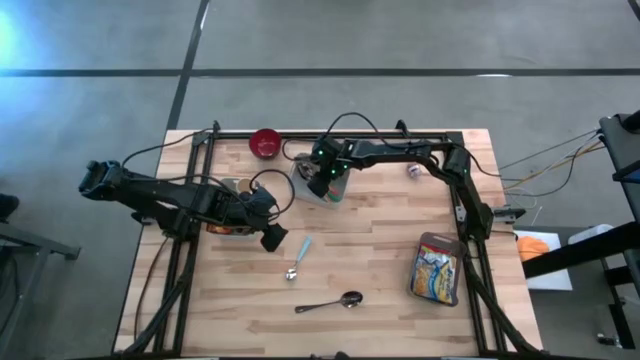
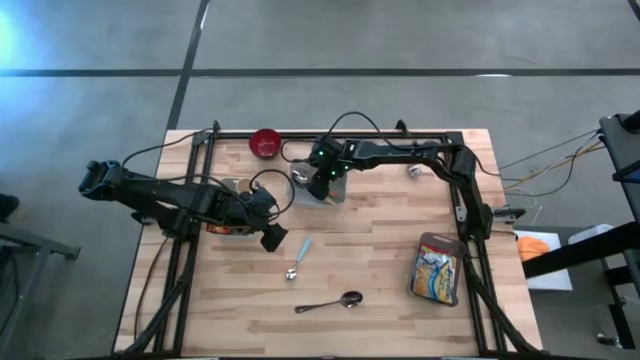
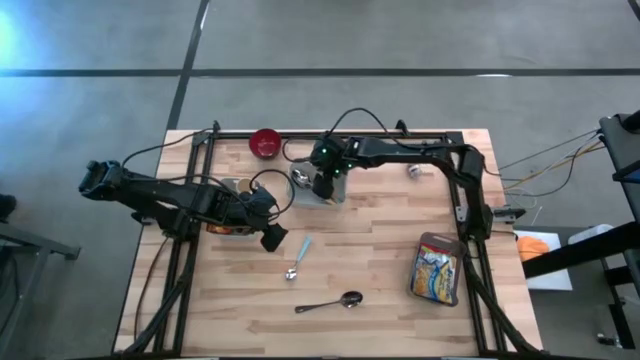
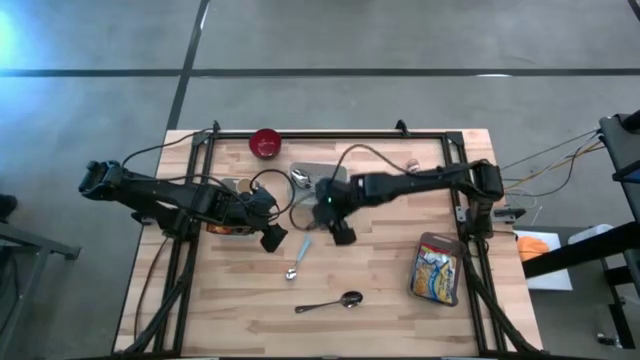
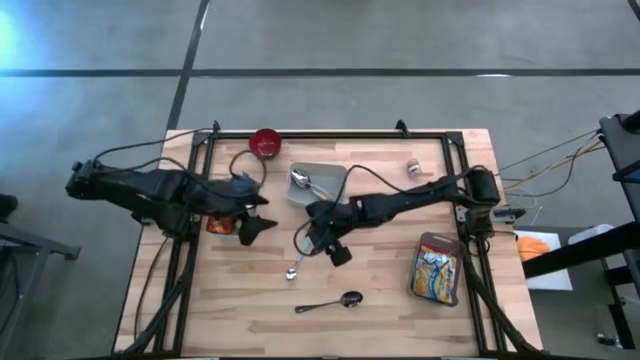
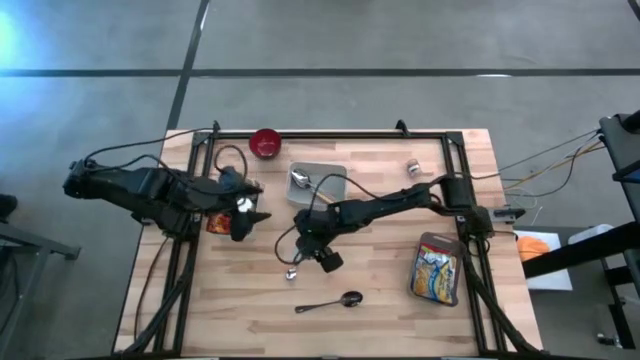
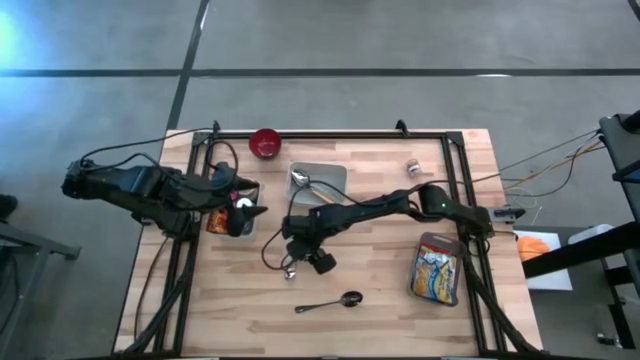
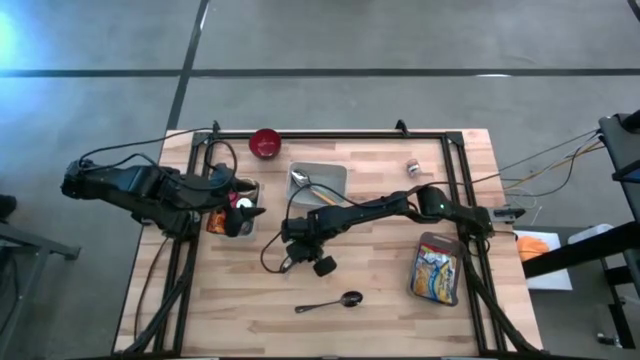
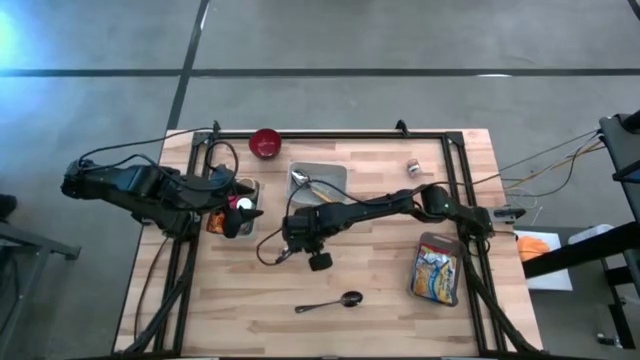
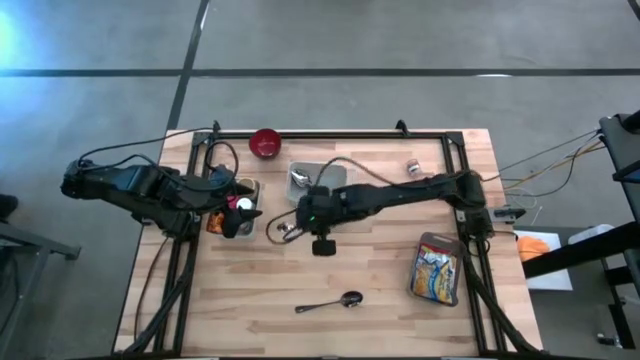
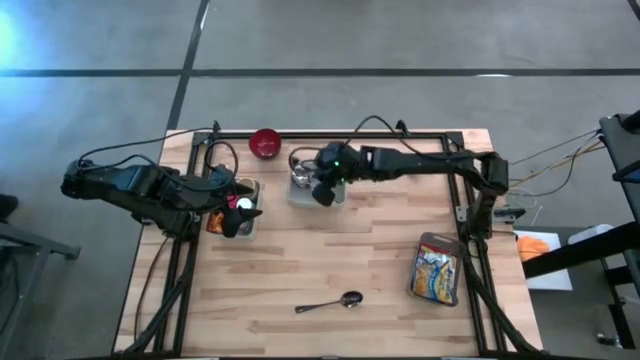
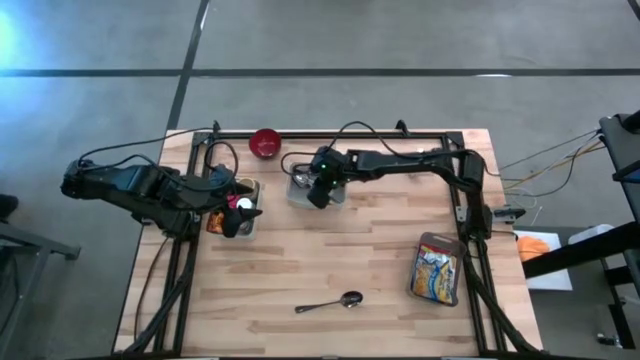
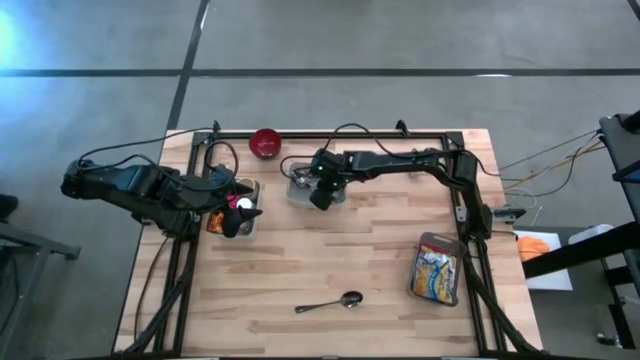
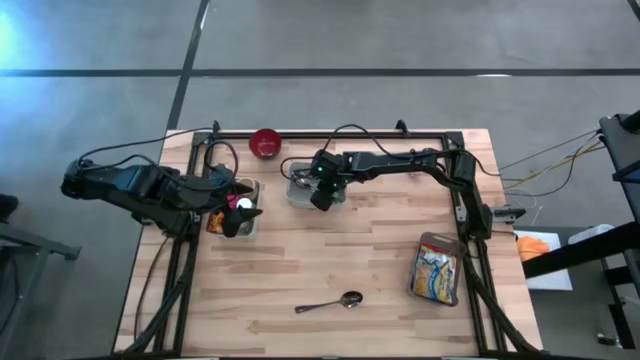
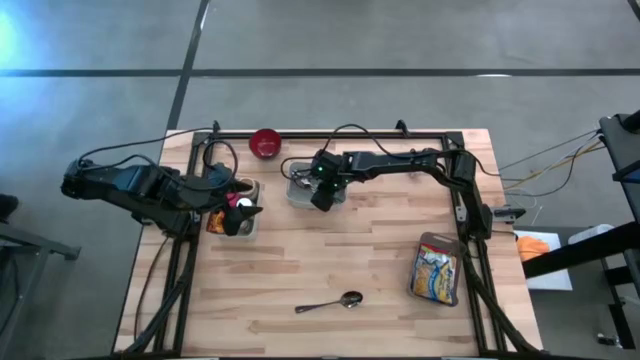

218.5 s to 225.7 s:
Put the blue spoon into the right gray bin
